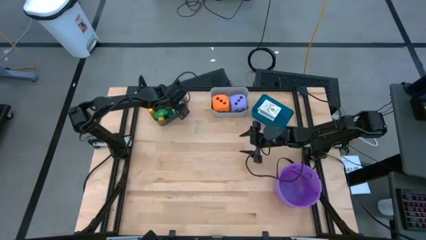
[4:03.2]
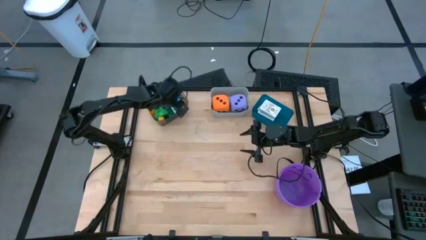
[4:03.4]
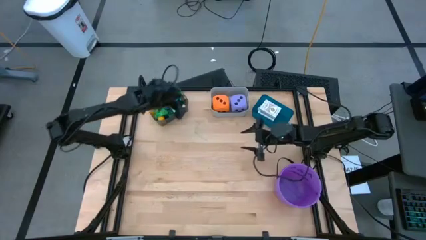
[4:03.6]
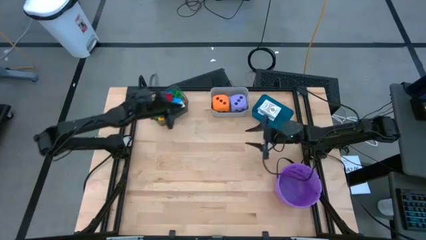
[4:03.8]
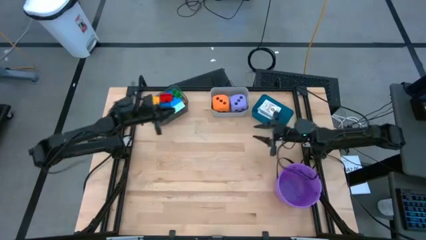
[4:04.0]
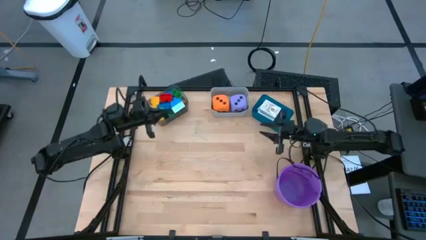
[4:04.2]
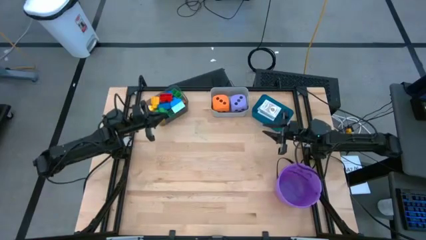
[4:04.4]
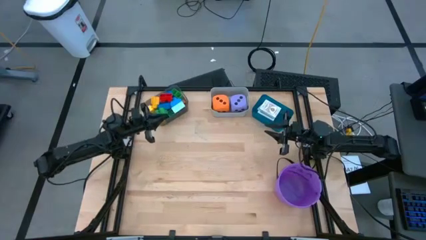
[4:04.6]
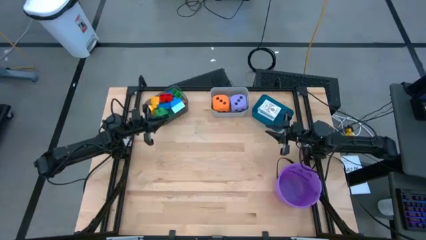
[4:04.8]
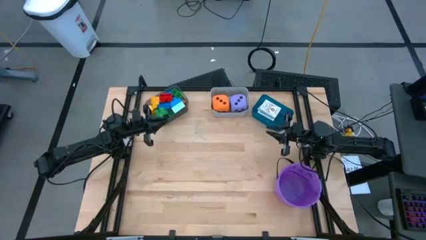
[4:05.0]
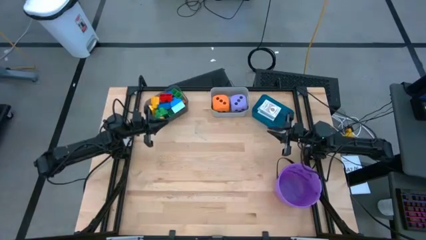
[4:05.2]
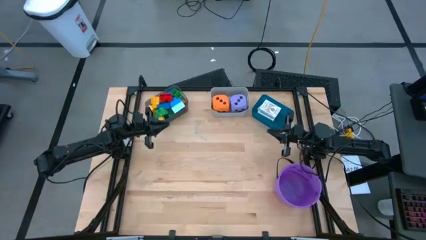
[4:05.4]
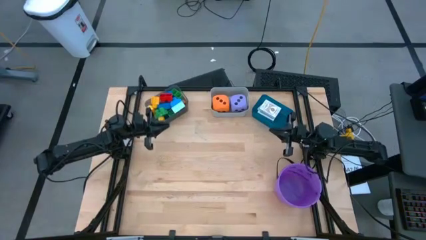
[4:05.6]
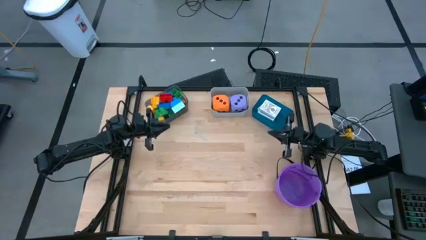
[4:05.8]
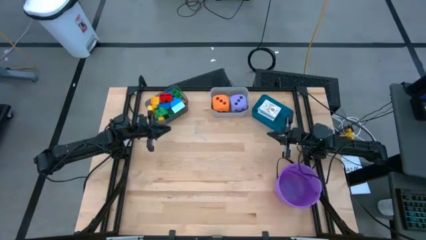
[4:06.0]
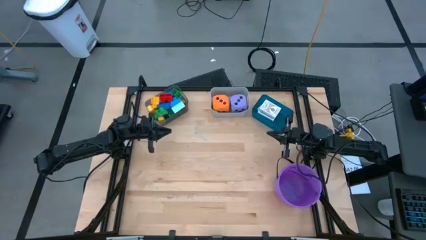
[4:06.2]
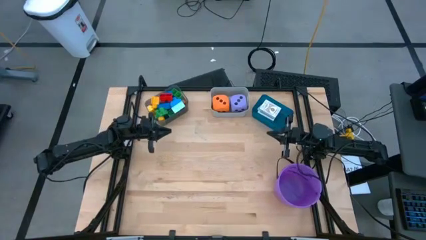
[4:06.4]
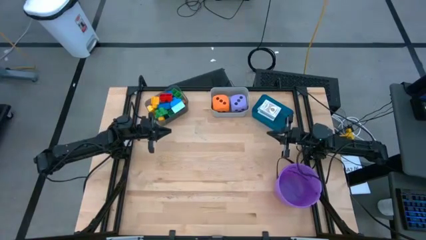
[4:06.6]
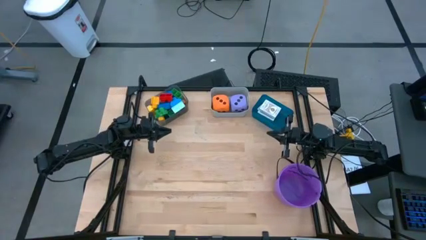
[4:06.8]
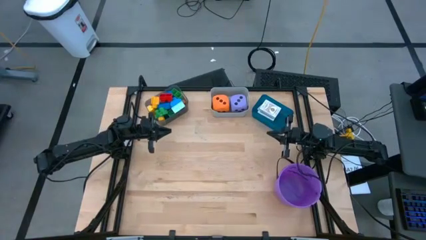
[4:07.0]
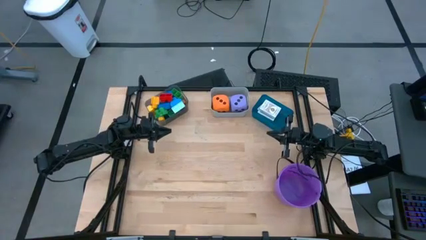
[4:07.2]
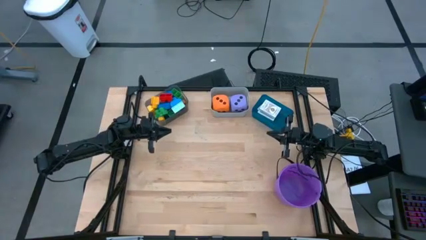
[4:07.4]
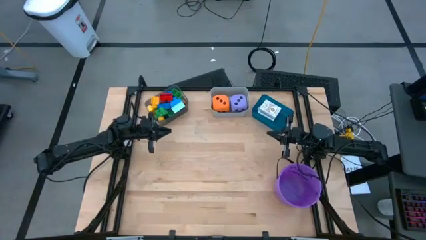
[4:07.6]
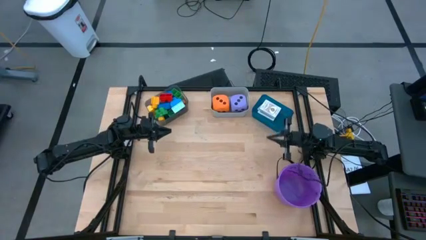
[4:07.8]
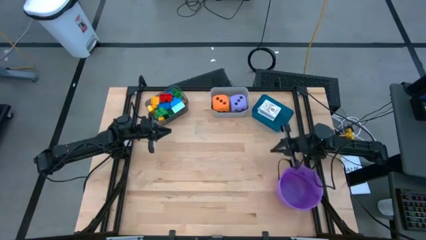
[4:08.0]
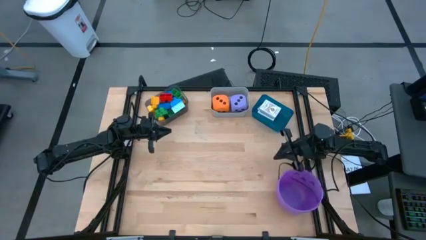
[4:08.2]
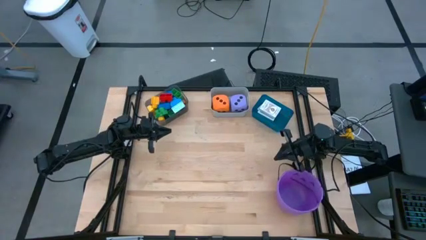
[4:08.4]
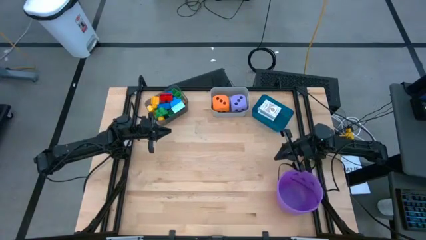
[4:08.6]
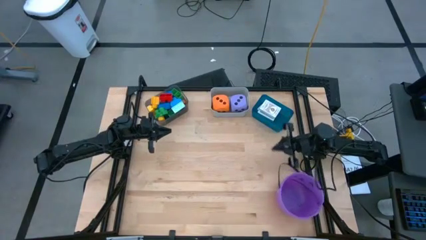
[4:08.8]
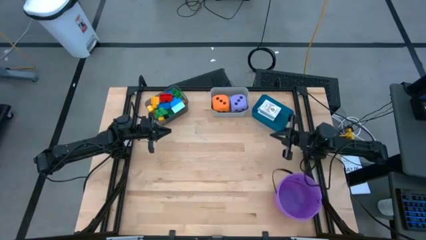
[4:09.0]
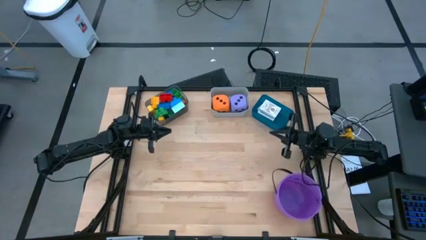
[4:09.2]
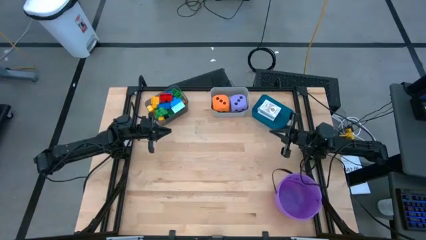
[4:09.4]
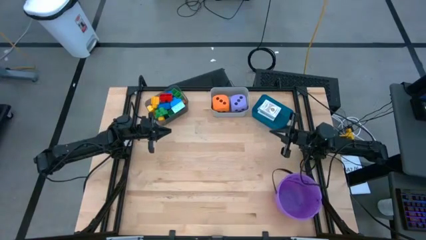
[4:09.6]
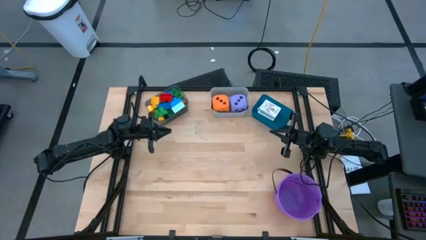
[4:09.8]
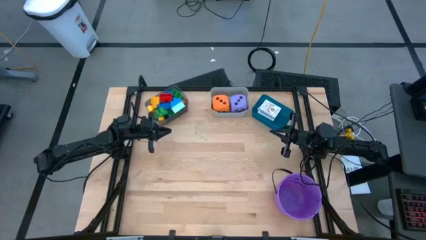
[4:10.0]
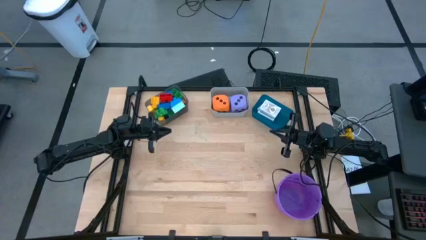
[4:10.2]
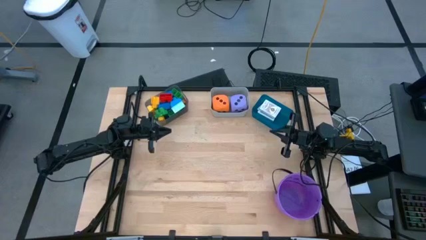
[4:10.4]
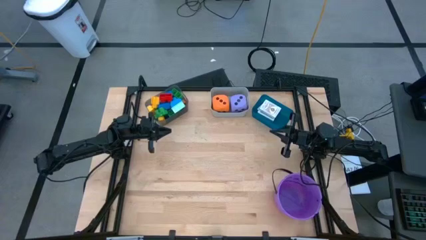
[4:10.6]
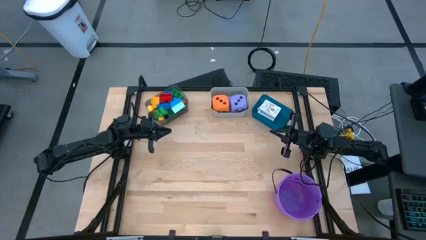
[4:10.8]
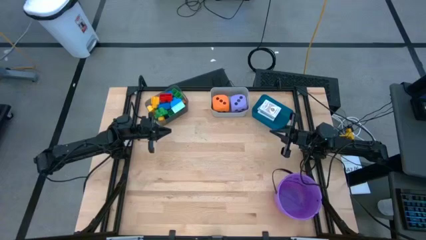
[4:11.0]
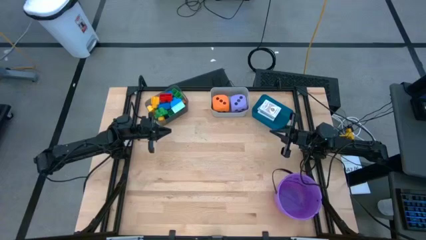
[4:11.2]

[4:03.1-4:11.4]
Task: Pick & Place Toys
Return to Home Position

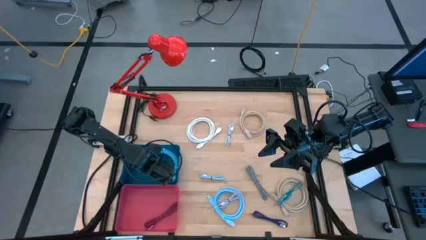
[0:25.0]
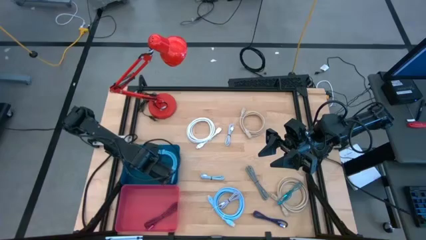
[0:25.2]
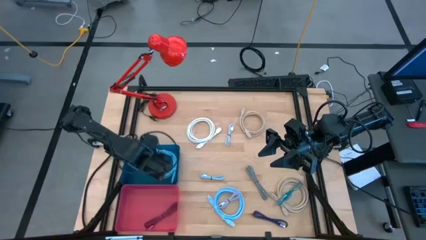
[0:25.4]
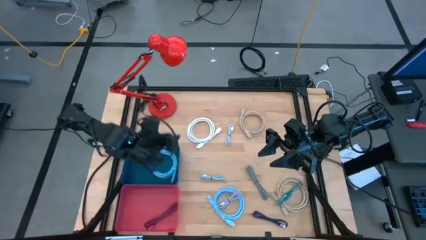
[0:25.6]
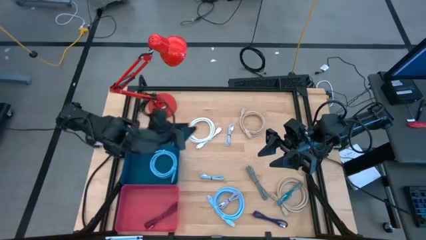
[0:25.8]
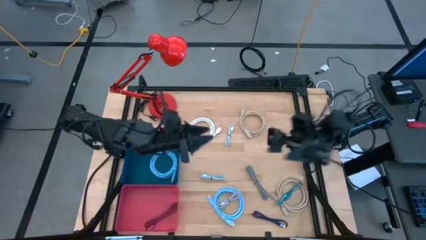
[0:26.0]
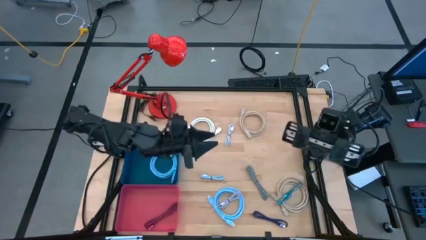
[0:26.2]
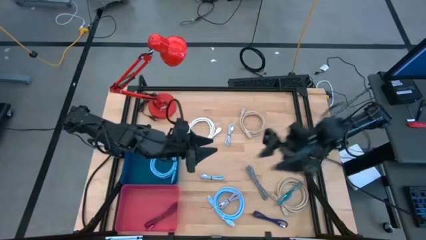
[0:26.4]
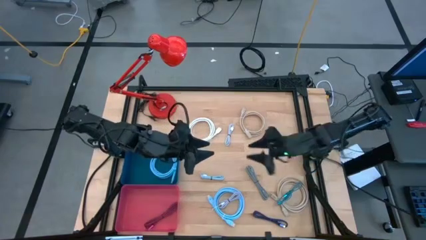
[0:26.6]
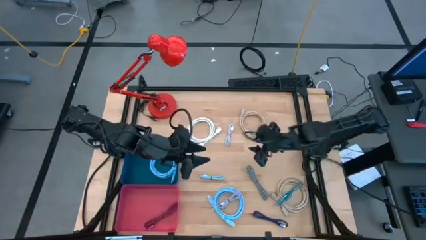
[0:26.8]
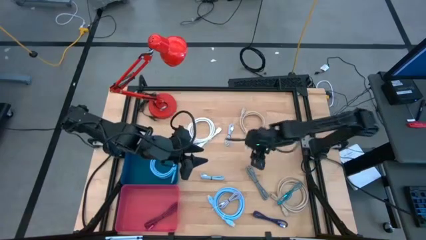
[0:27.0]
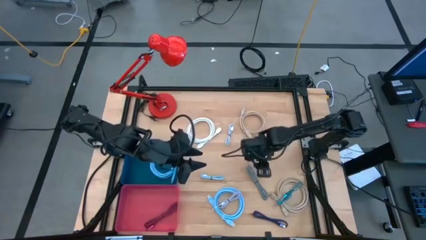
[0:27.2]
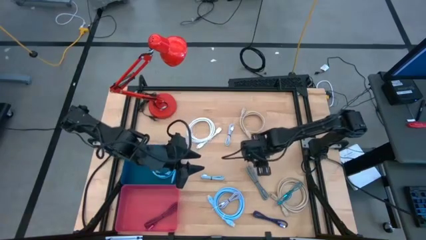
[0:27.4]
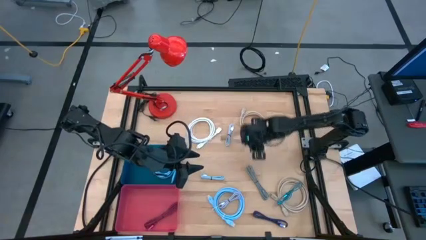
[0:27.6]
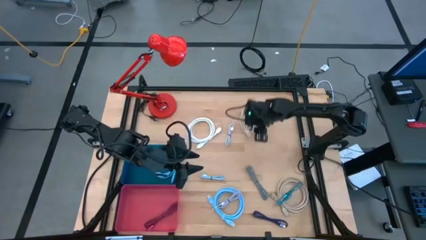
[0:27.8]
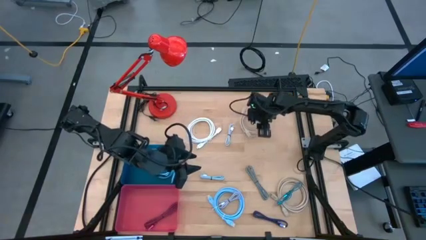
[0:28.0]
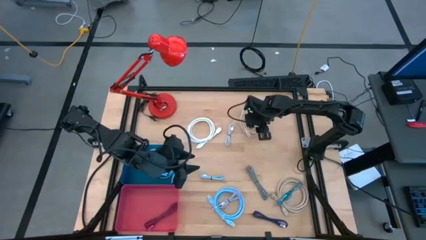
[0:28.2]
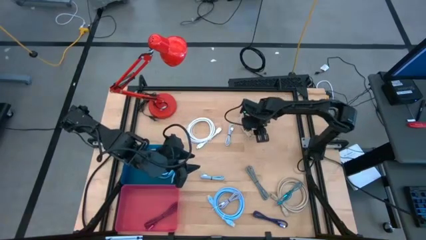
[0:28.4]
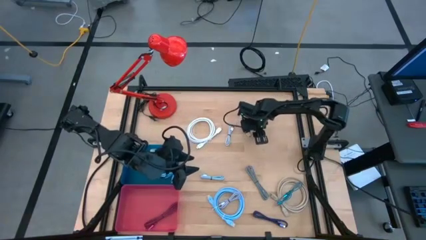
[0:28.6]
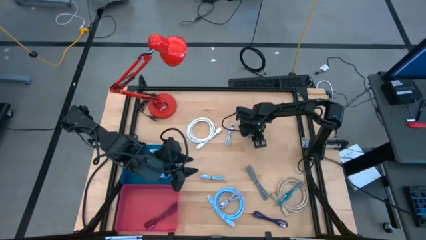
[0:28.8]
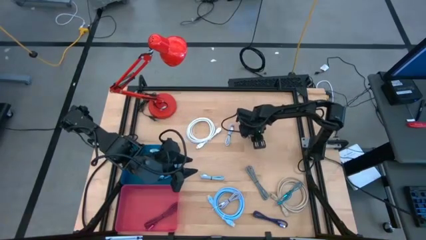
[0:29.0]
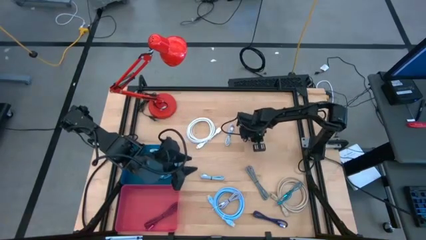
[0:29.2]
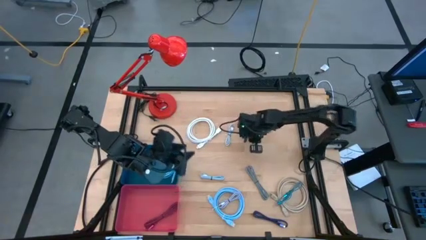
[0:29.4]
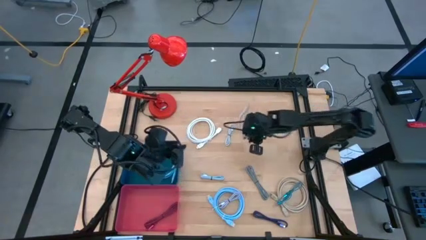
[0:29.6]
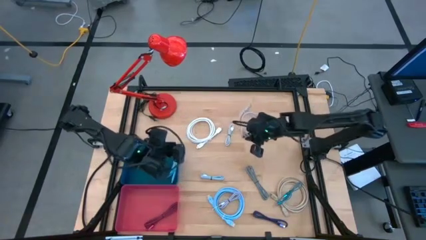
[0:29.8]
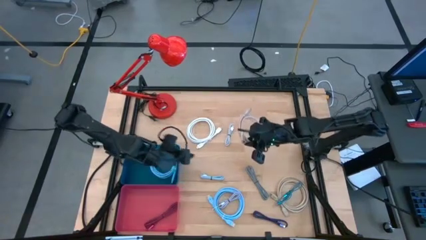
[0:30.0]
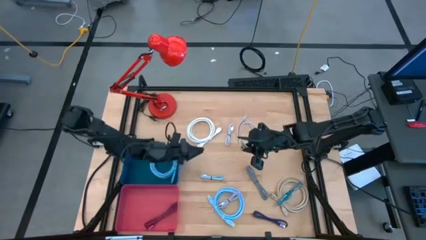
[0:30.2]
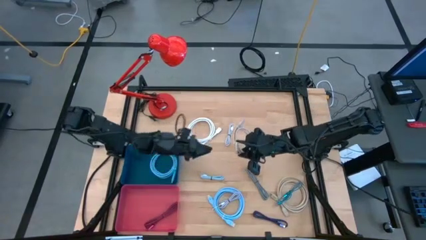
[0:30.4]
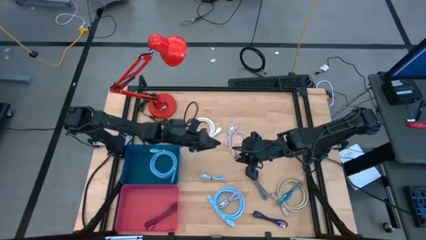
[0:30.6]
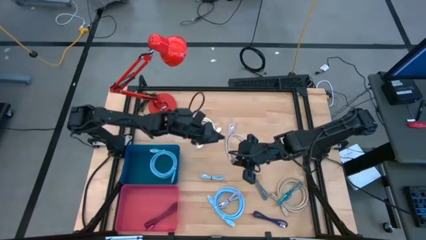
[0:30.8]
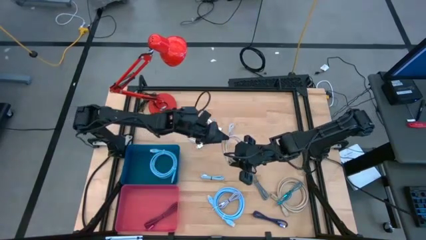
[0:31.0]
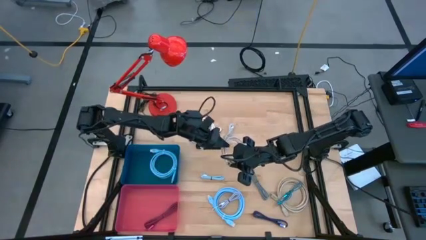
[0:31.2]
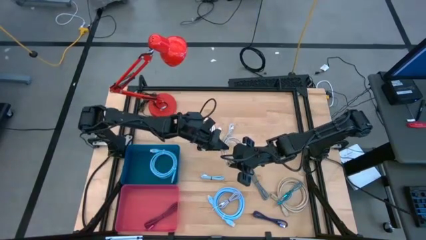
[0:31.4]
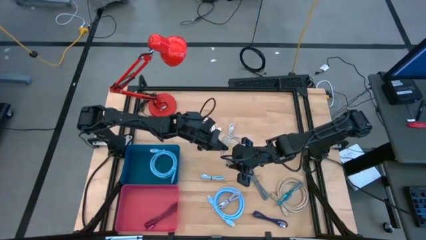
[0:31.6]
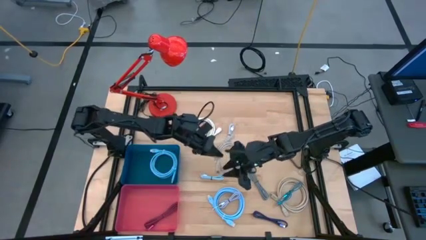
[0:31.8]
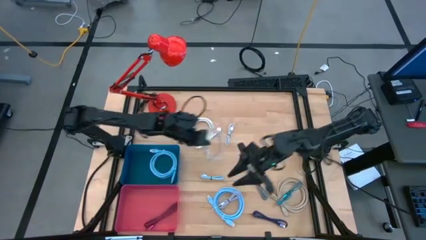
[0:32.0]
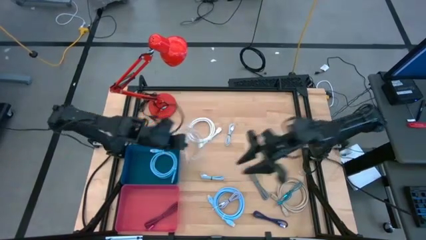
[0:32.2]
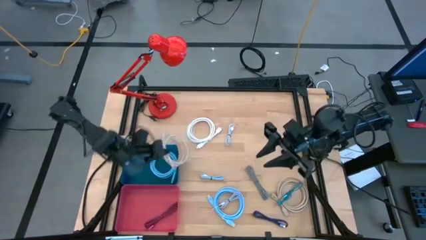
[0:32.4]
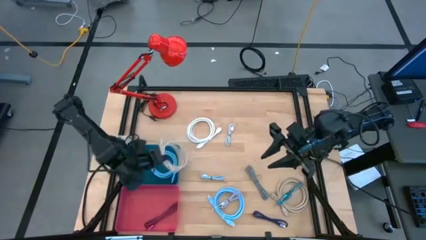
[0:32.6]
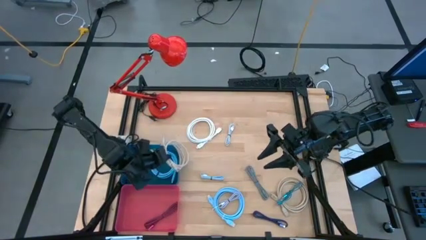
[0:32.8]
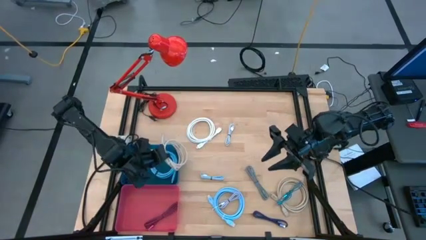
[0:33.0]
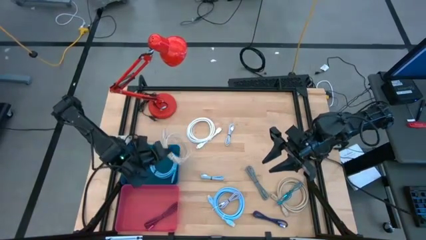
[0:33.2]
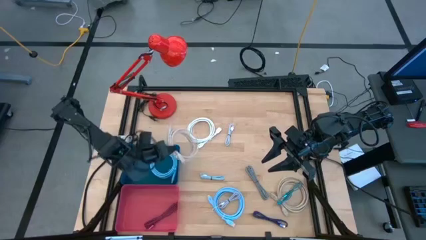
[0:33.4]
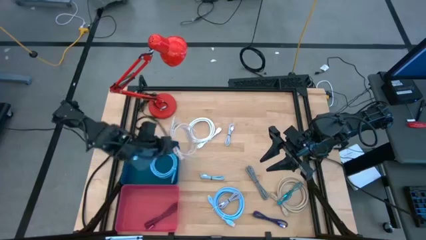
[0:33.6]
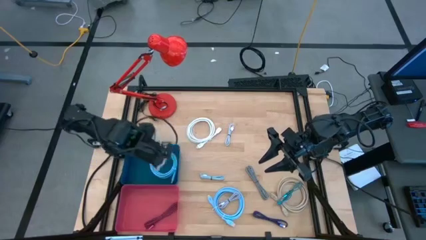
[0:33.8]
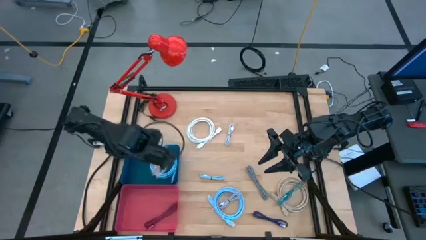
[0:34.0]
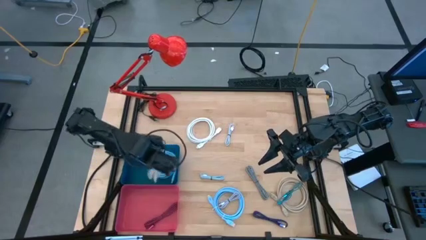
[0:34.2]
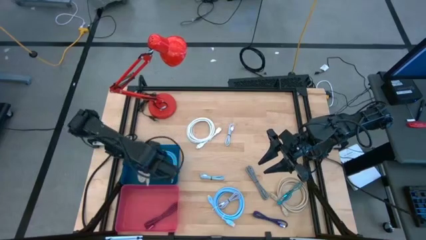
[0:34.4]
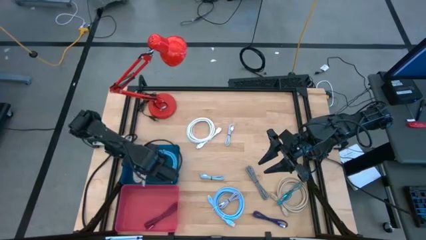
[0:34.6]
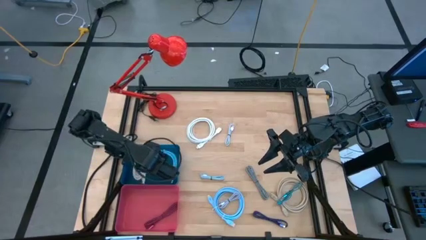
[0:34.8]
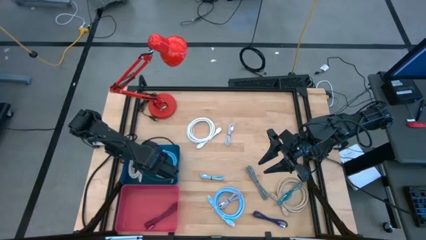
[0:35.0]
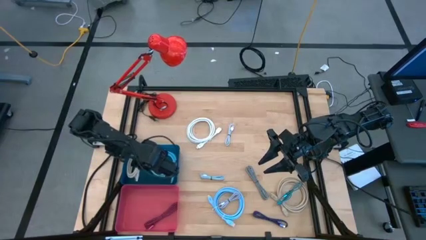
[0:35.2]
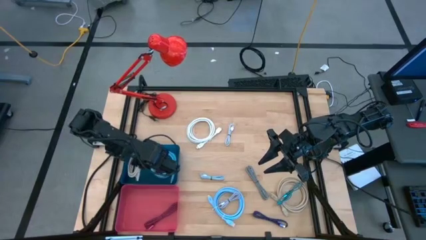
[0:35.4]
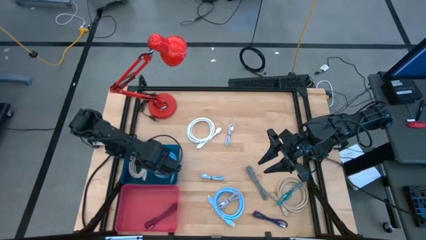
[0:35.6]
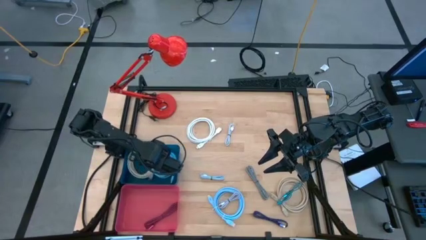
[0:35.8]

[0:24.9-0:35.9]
Task: Pick & Place USB Port
Put the top brown HDMI cable into the blue bin
